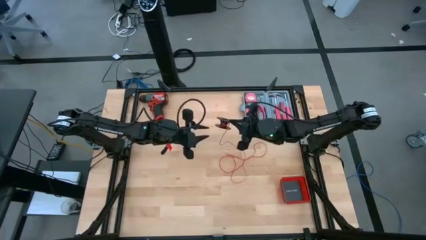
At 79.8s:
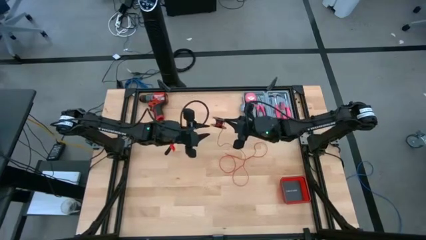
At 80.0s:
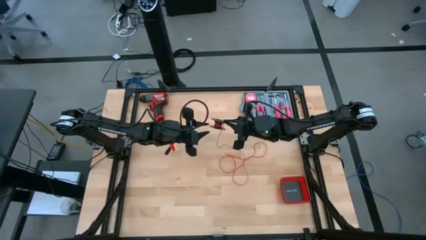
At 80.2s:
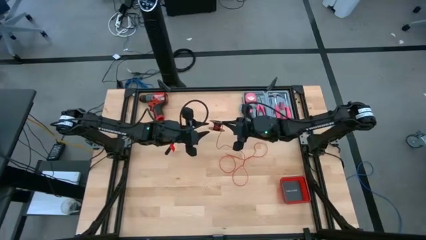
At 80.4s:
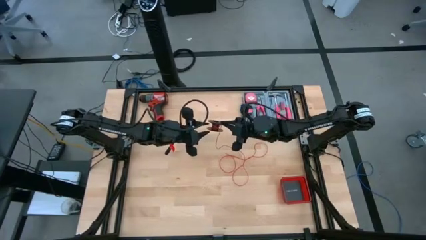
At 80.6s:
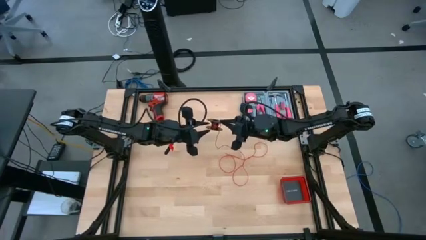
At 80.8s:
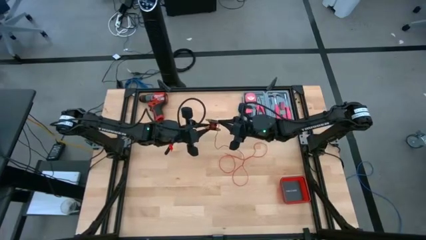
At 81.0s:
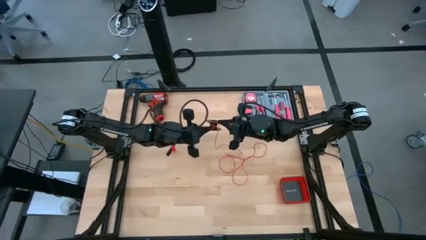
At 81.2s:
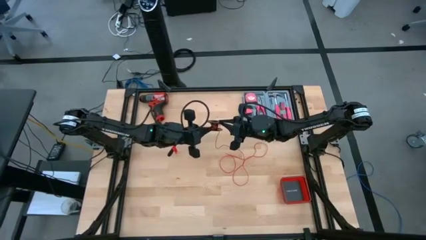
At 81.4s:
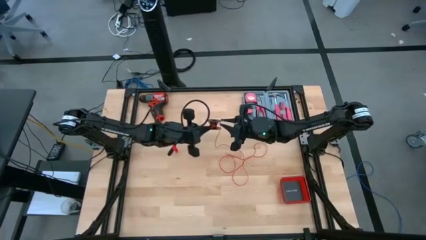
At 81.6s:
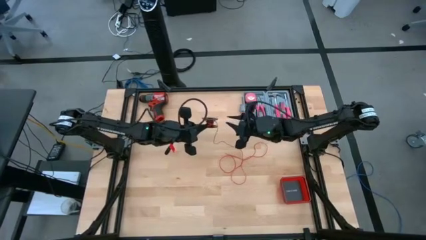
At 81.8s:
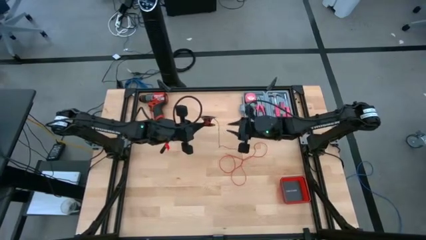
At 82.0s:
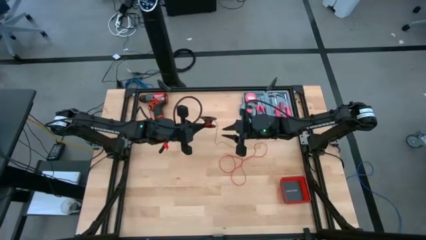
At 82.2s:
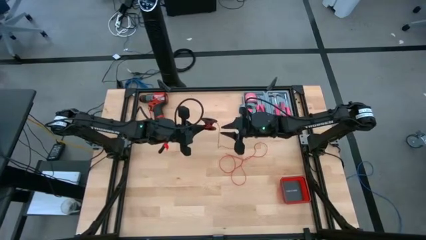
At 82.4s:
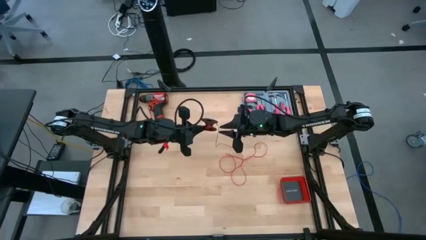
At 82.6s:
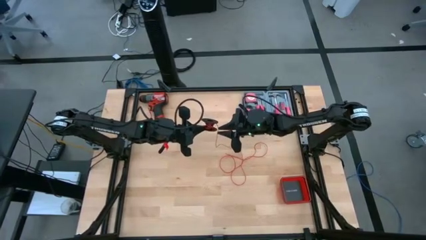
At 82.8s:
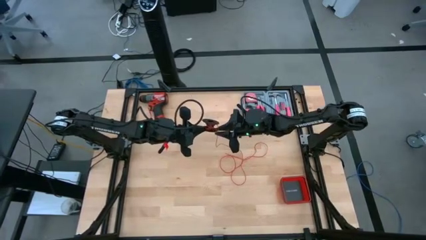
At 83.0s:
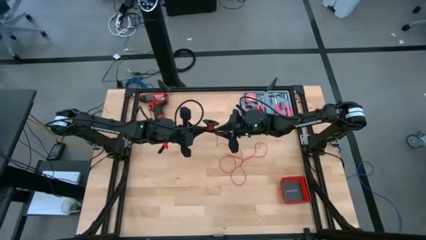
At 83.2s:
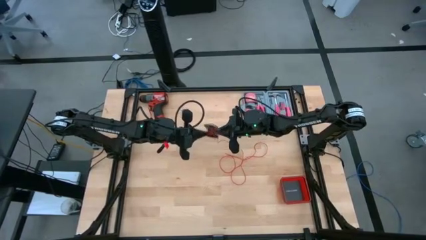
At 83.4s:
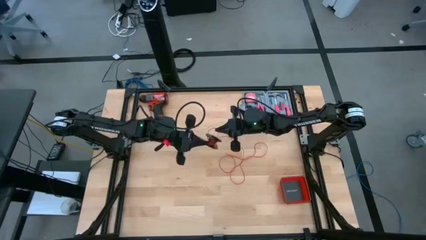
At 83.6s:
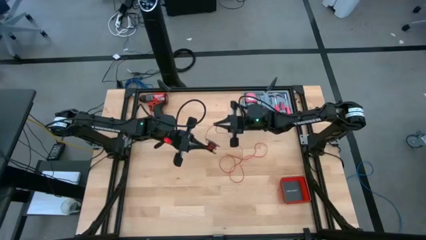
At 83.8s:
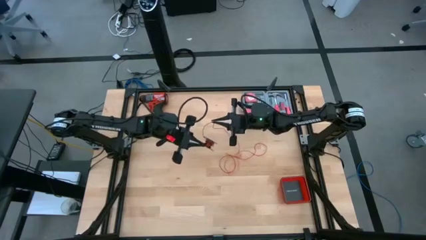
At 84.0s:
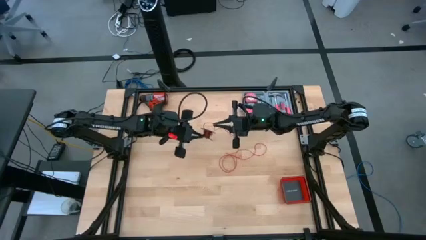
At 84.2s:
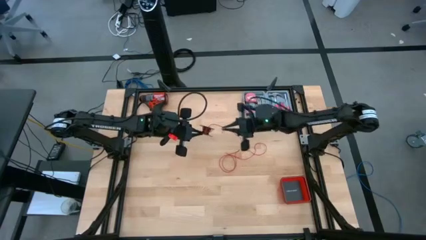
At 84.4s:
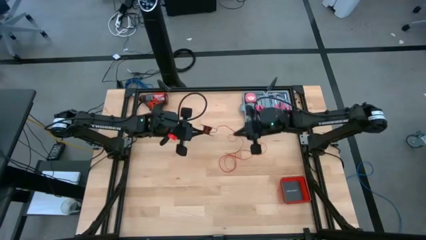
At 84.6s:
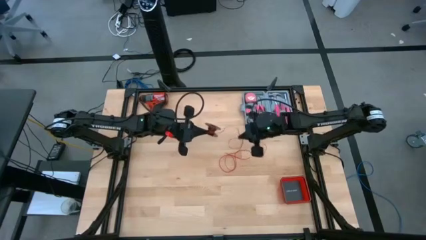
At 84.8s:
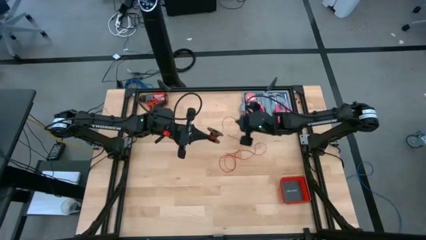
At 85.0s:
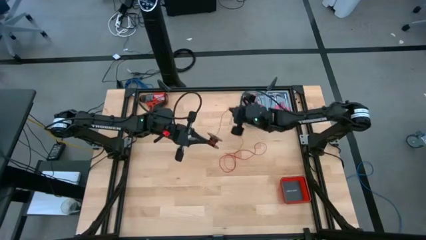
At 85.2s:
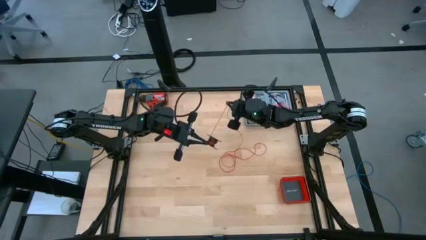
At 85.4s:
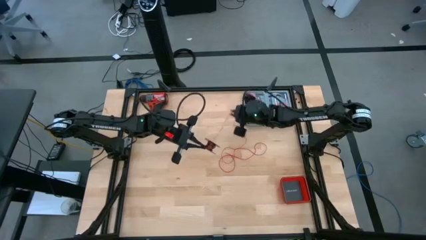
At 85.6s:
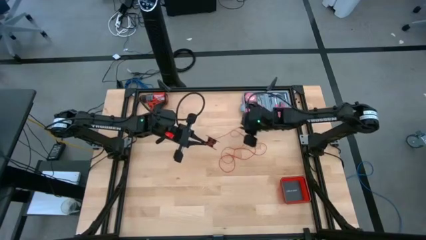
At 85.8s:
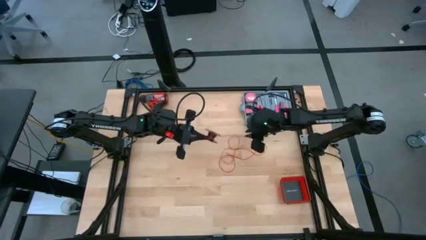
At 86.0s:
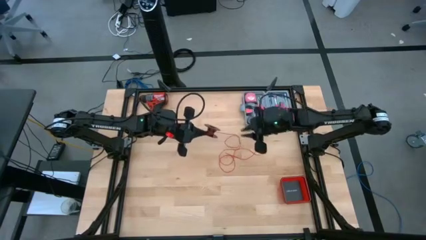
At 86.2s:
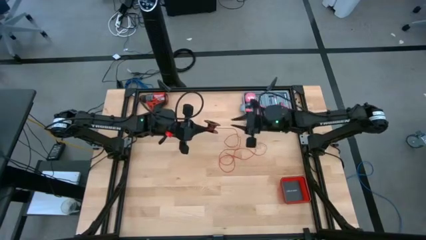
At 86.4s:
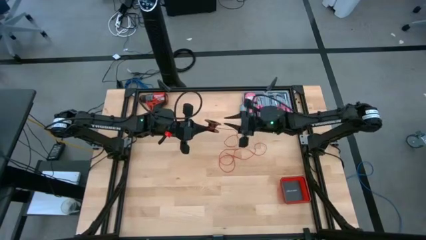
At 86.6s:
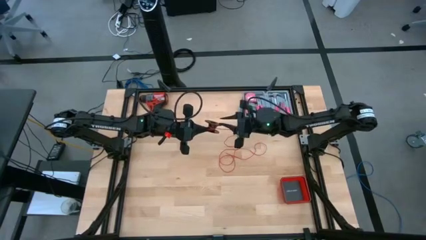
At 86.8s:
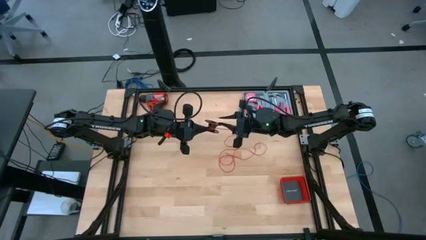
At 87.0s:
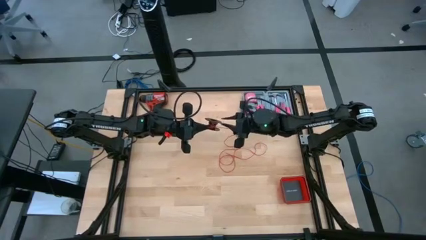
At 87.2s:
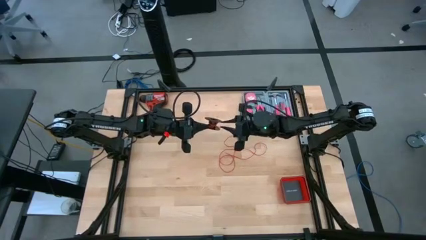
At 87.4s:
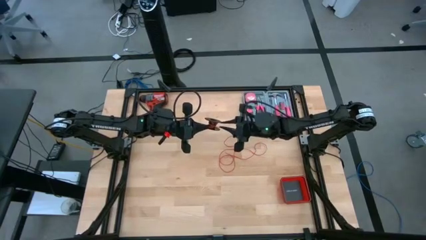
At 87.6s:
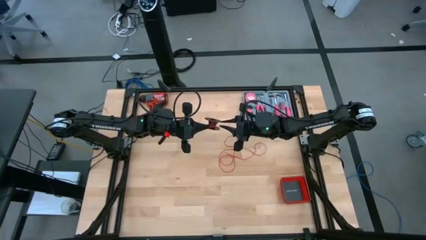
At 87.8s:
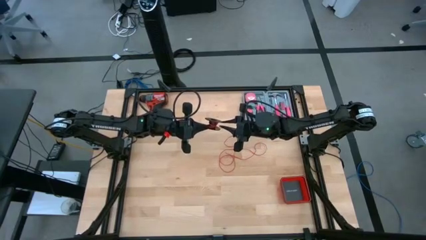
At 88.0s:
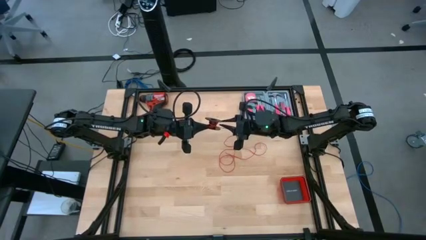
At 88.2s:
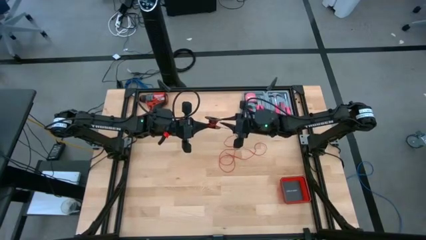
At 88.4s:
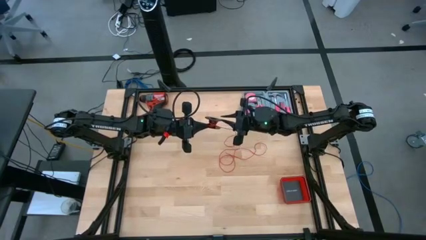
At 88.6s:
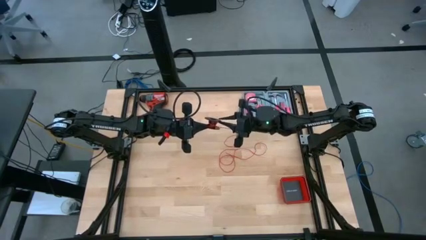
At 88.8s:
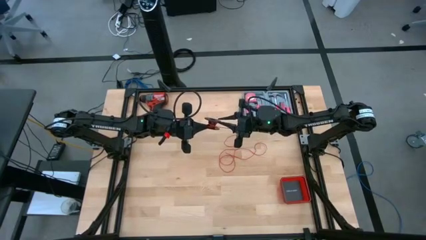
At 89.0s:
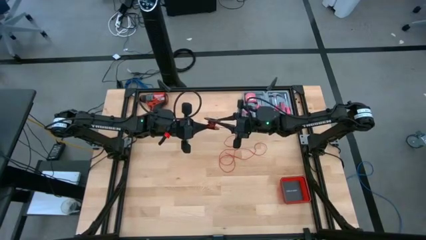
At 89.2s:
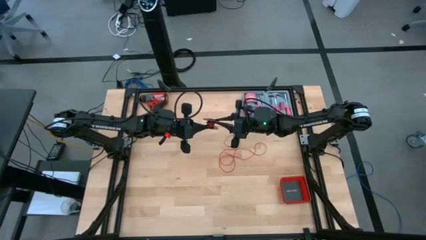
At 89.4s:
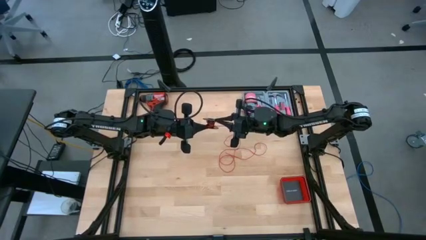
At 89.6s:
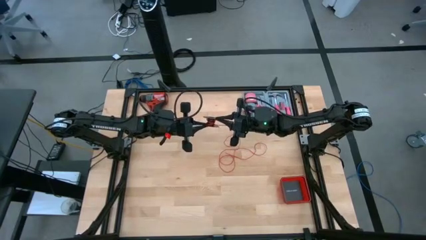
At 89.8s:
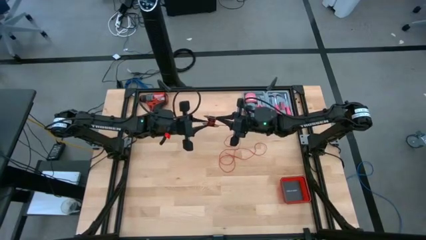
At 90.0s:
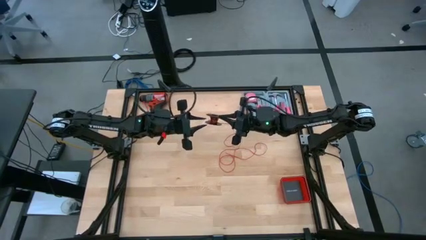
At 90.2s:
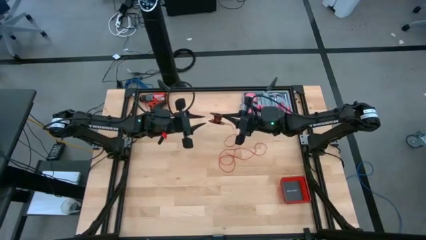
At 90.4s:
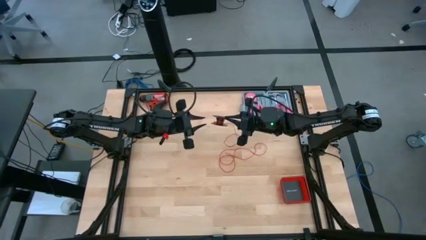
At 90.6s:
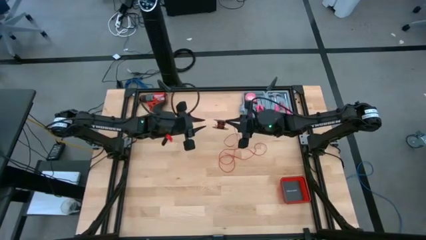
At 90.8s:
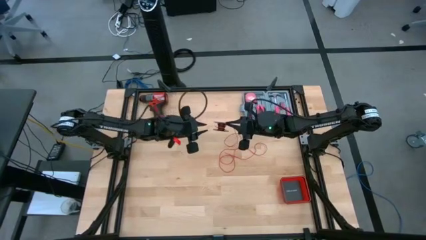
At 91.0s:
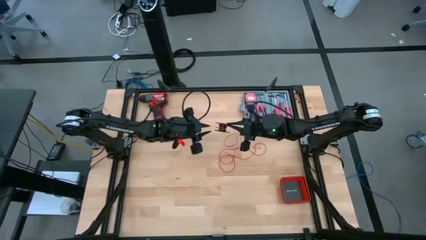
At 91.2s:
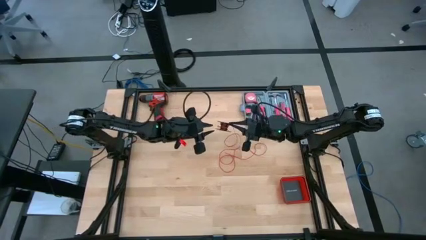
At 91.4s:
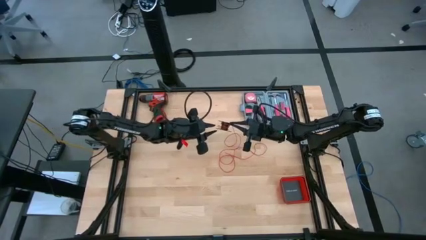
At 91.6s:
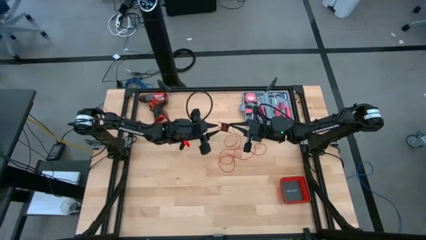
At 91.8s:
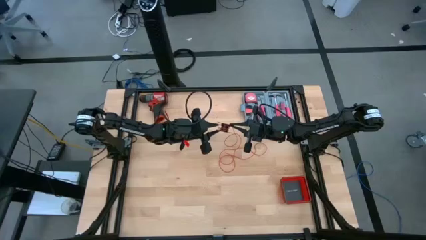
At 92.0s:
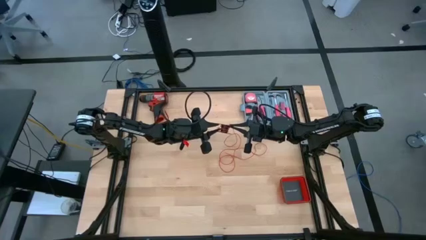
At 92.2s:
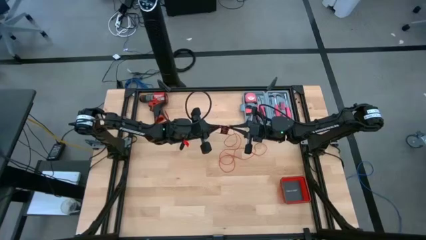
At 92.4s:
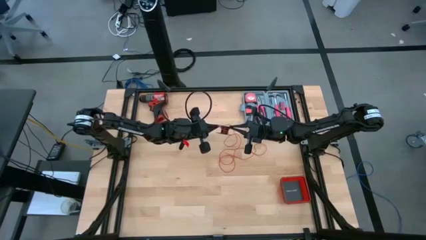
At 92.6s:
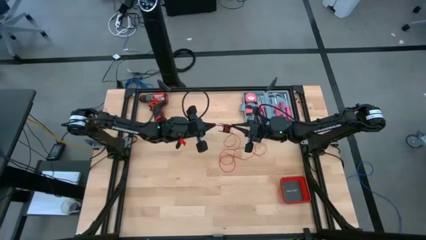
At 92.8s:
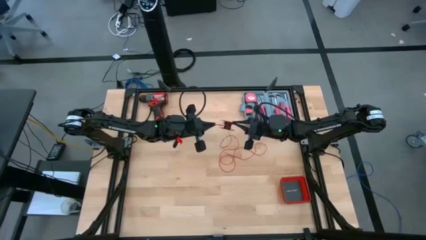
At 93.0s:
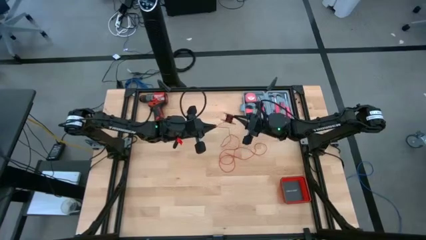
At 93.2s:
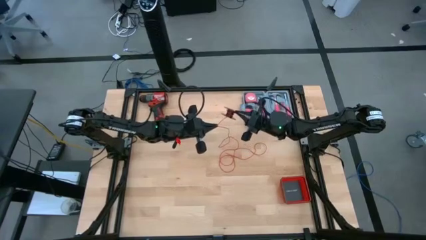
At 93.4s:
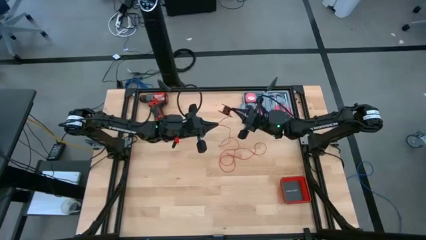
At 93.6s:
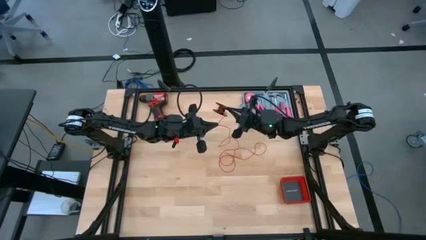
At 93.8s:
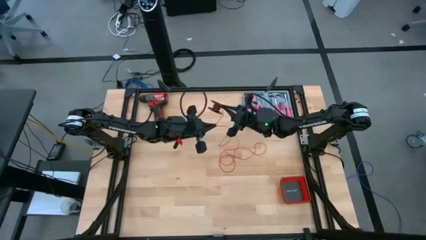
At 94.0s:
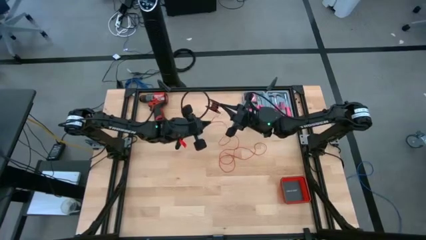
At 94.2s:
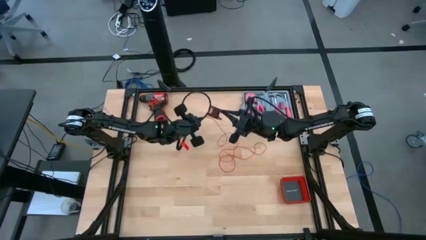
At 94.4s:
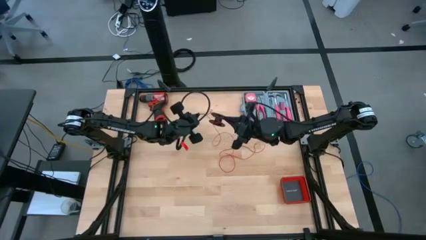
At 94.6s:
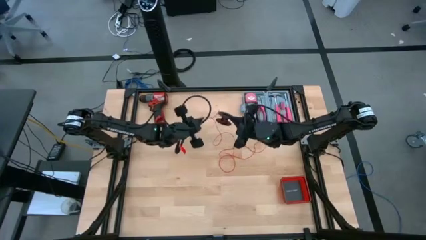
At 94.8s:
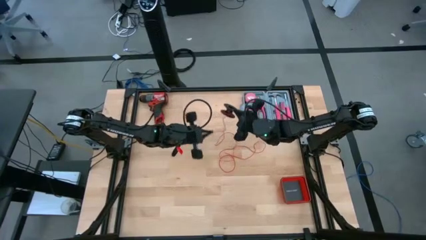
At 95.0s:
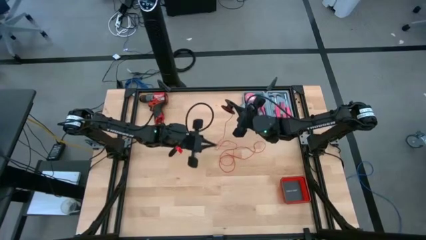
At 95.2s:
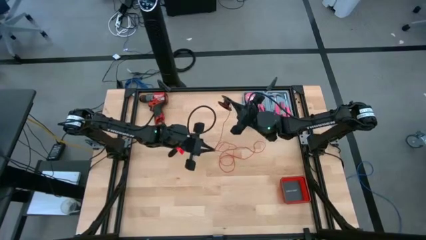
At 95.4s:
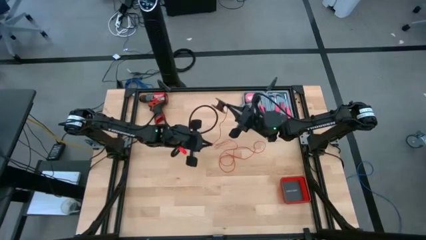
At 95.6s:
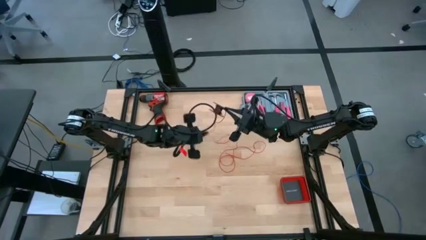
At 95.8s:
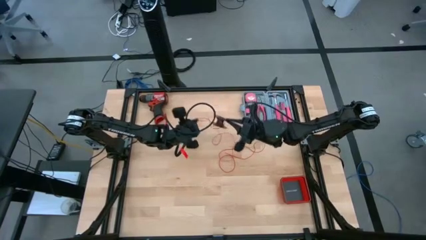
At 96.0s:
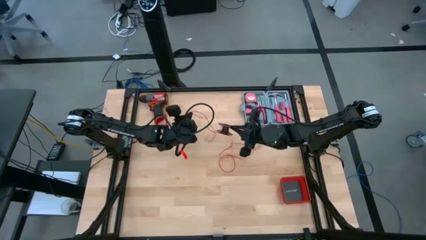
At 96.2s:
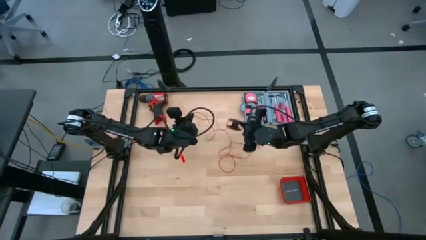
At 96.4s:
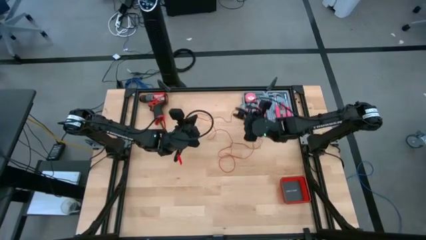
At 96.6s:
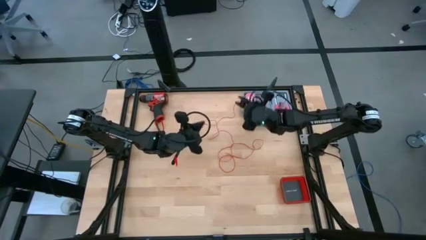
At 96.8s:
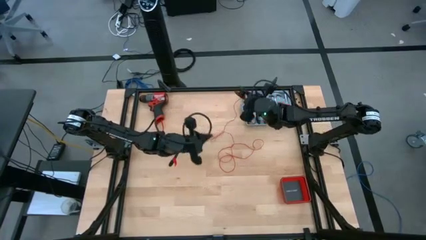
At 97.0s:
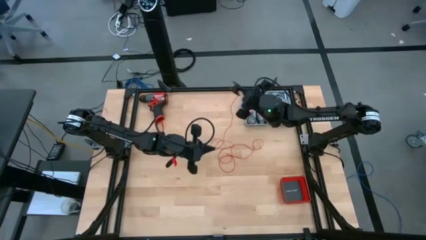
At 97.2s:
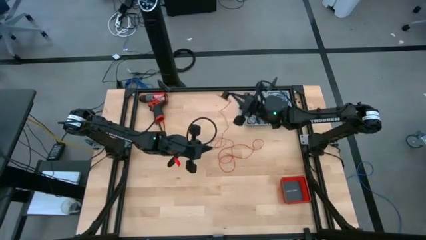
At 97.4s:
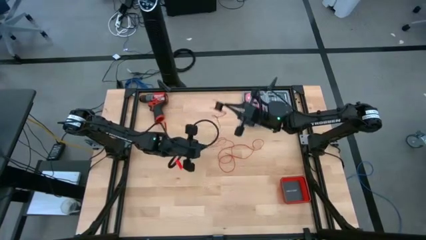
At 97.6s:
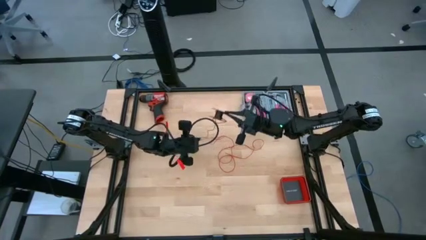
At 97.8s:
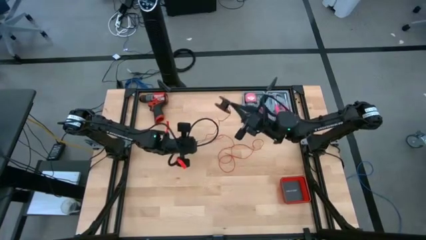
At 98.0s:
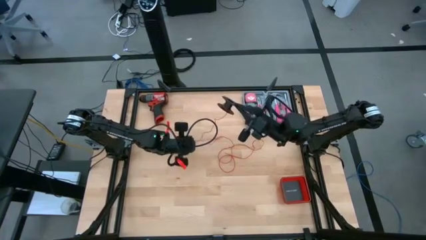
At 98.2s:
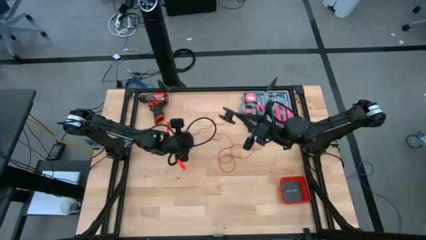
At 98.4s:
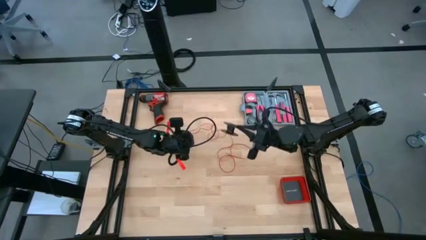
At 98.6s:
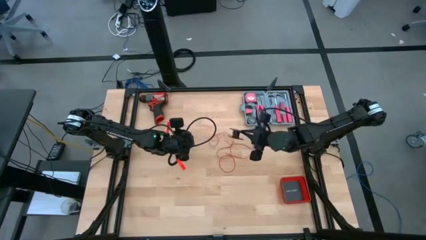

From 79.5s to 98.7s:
Task: Coil cords
Uncoil the red wire from the black spool
